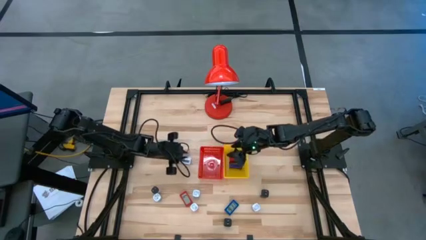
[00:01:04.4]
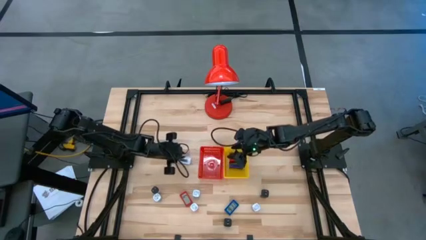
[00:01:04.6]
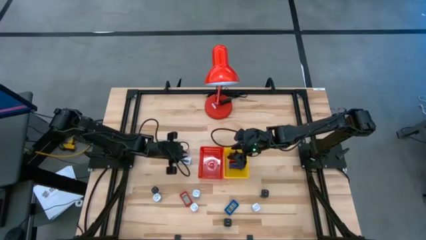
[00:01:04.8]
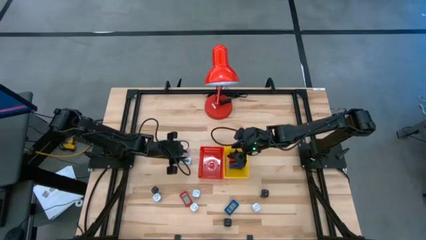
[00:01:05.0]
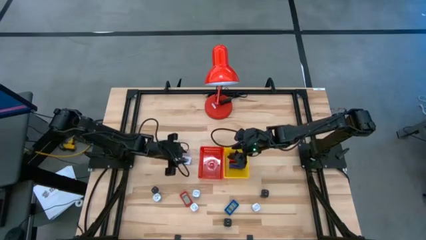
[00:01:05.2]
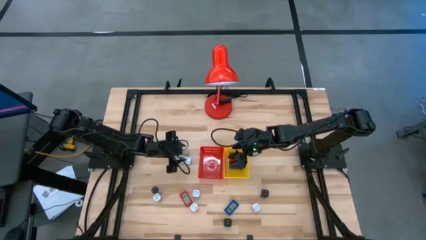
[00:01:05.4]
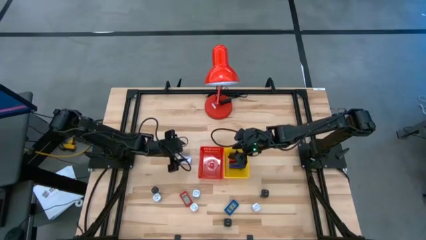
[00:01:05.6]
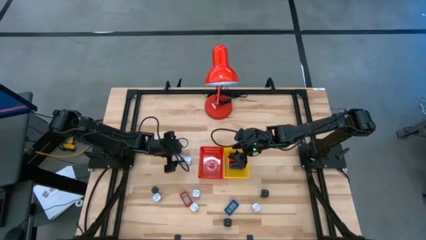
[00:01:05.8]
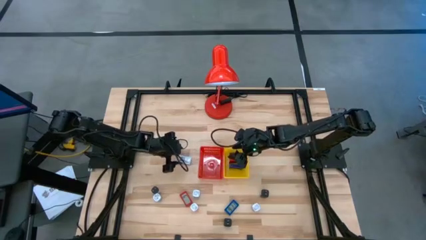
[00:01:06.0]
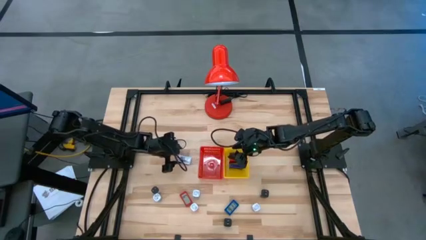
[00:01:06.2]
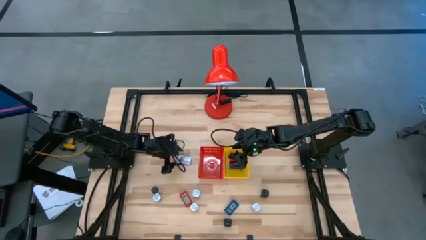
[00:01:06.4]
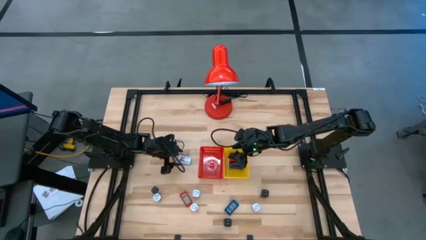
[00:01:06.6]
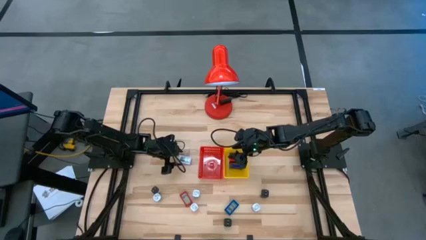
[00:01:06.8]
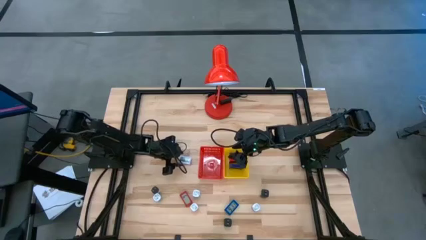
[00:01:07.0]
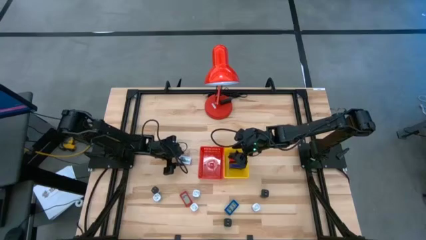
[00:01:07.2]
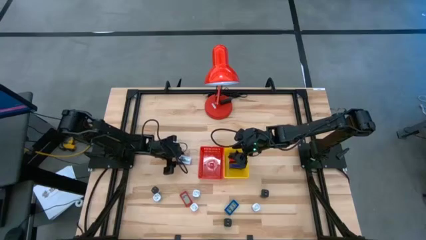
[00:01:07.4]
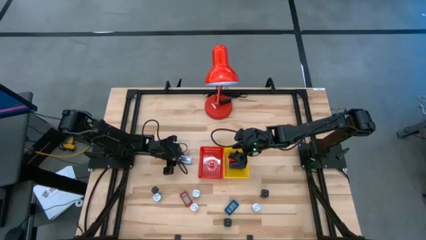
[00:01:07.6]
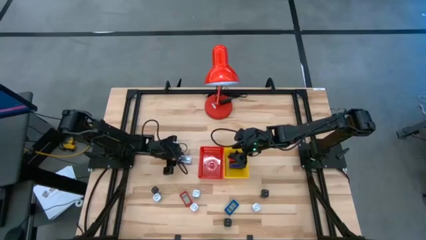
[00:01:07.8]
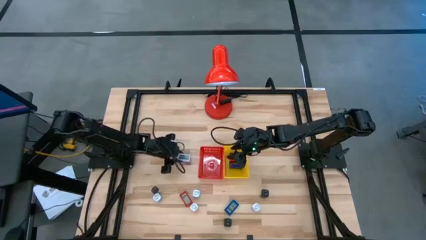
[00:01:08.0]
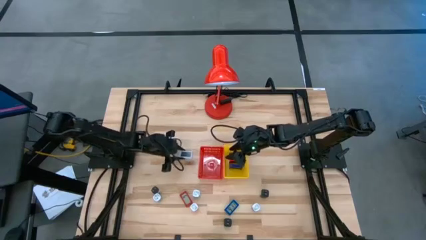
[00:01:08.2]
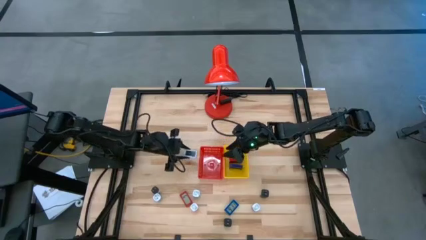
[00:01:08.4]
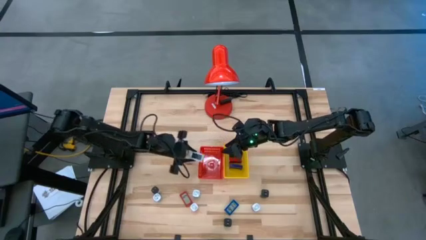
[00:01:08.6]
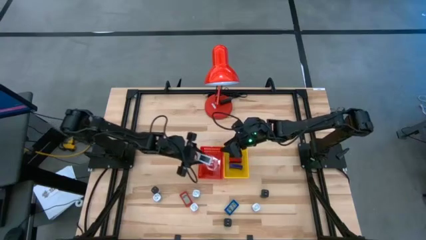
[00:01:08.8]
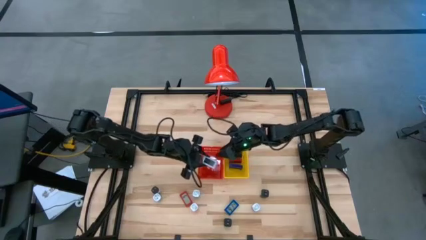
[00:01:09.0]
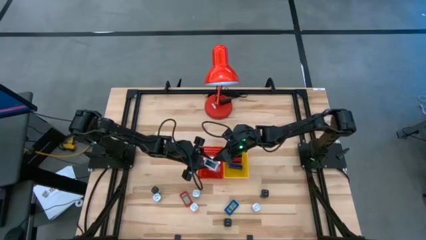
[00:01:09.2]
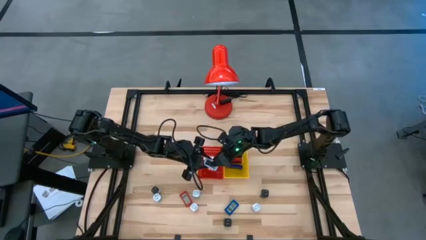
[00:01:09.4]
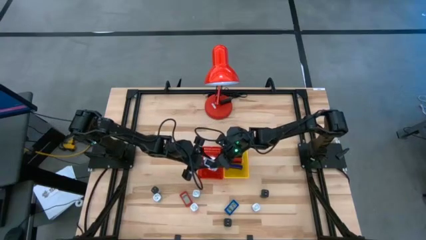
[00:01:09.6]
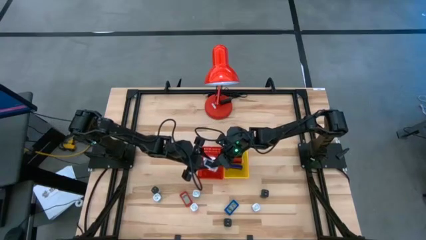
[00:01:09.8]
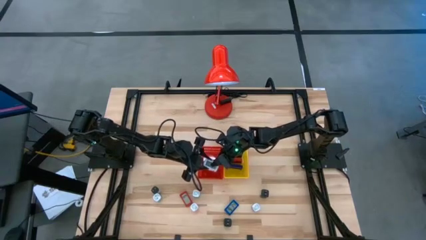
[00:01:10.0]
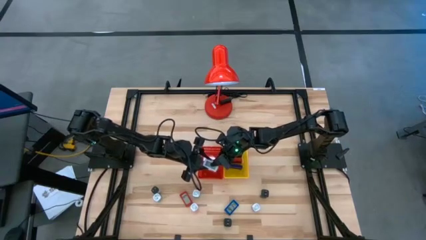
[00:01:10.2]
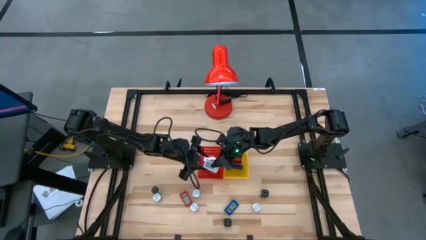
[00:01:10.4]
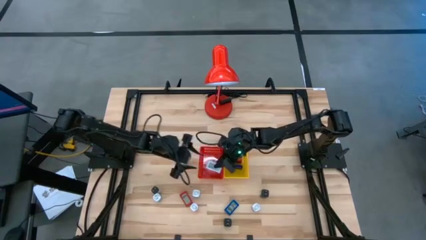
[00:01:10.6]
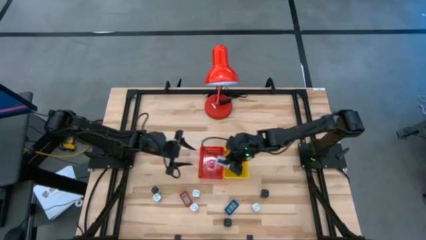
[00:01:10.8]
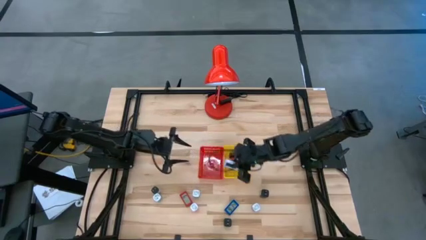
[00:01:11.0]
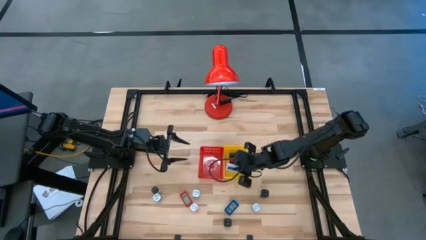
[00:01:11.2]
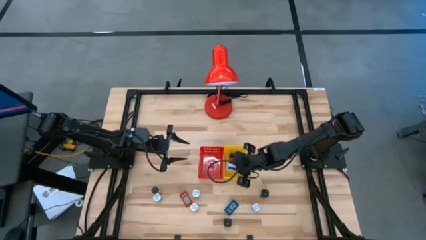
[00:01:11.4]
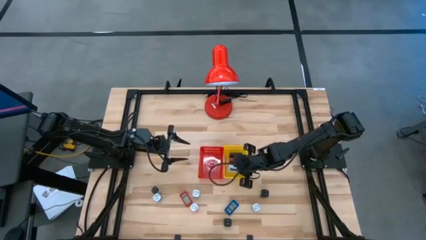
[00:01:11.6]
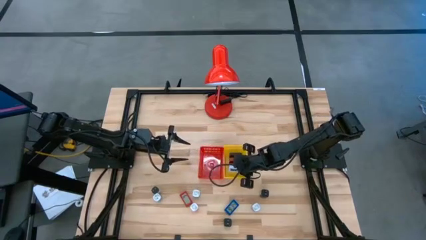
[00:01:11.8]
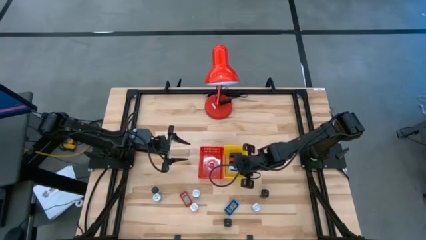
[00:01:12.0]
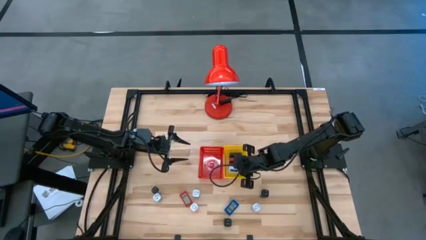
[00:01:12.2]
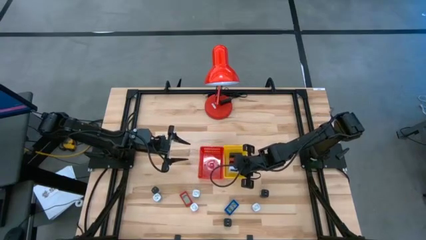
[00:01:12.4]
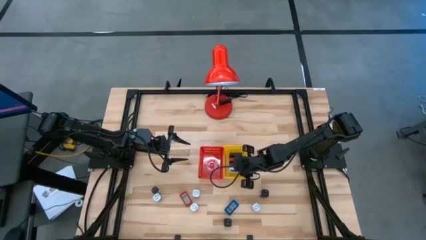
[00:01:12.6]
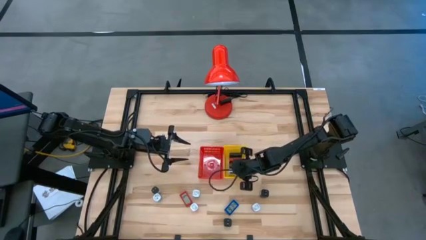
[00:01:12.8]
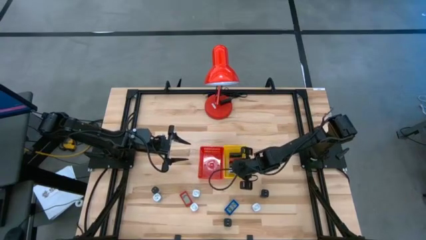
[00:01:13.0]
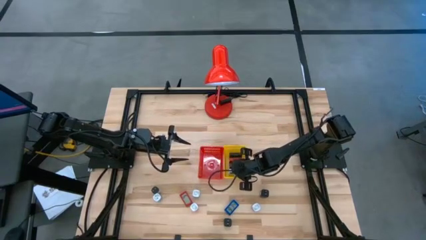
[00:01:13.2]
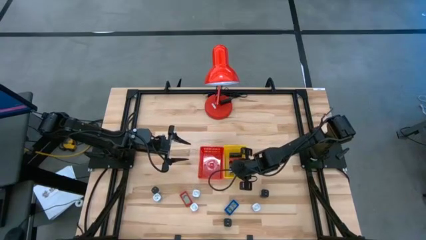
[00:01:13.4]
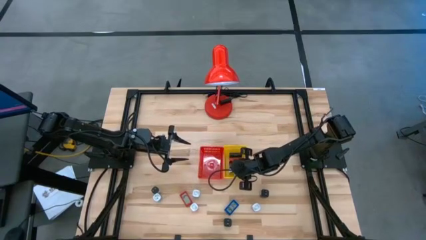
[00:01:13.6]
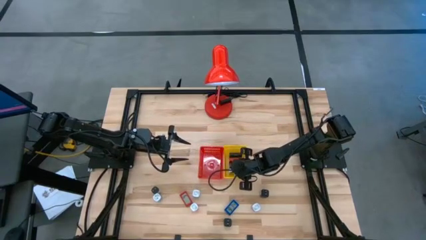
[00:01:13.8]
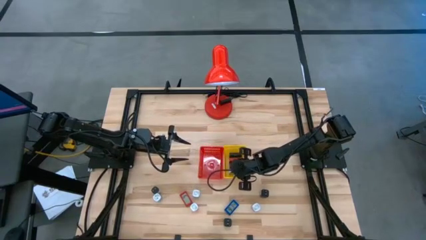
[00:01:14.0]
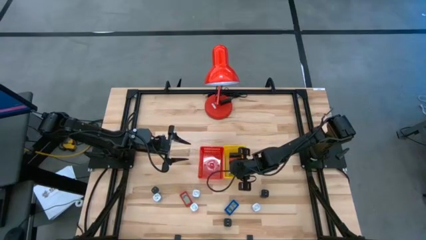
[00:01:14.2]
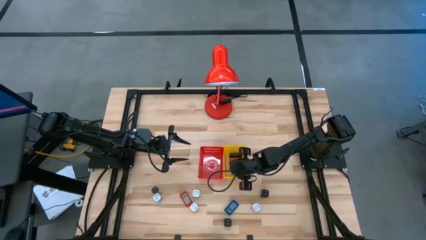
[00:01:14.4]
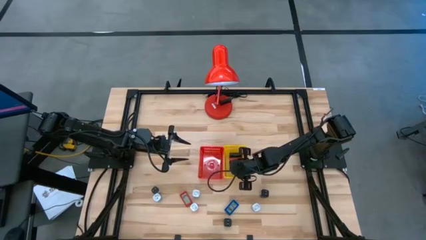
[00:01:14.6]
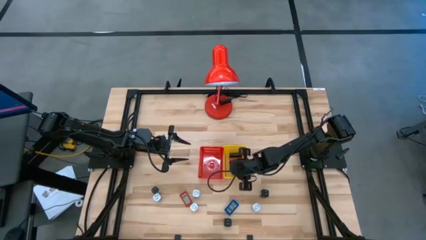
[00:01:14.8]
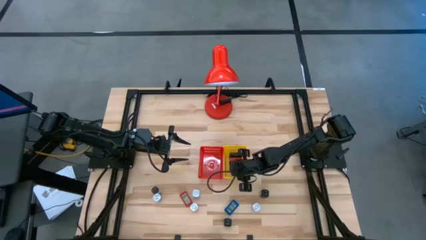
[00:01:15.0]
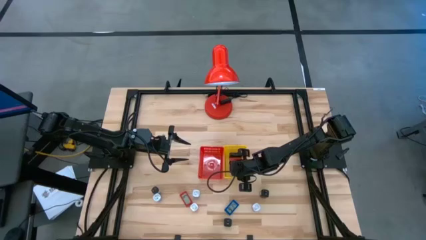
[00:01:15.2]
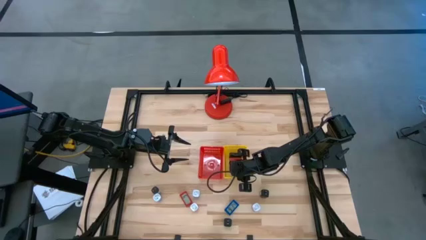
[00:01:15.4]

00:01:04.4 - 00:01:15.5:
Task: Pick & Place Office items
Put the white digital timer into the yellow bin

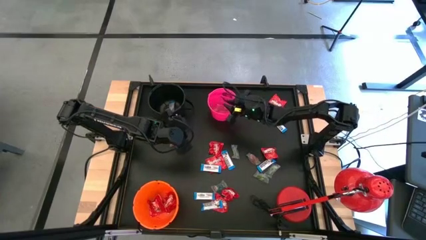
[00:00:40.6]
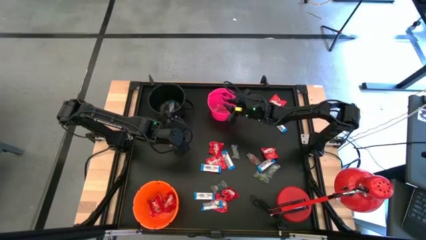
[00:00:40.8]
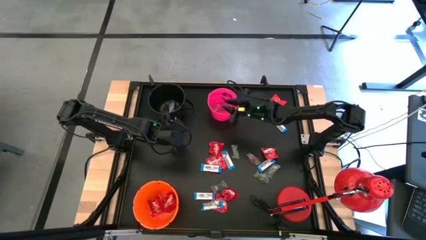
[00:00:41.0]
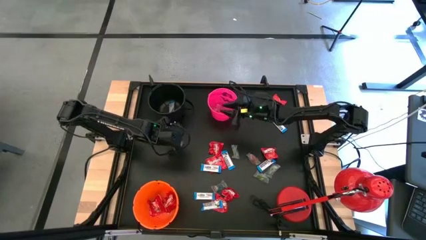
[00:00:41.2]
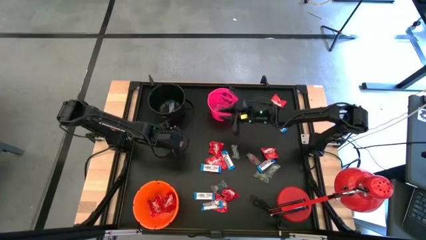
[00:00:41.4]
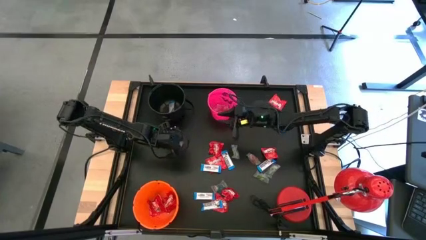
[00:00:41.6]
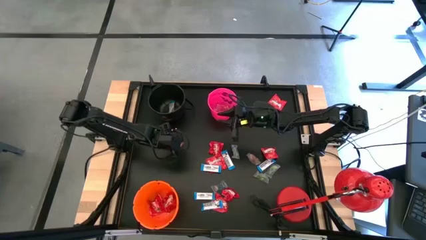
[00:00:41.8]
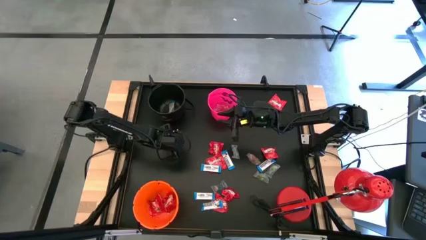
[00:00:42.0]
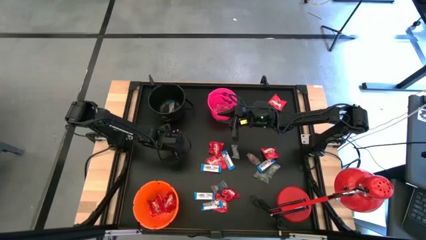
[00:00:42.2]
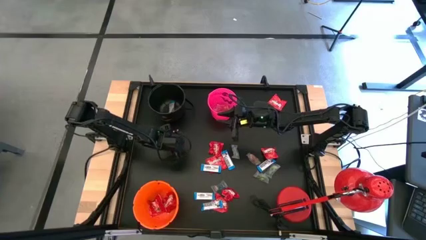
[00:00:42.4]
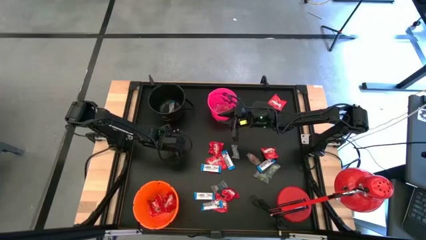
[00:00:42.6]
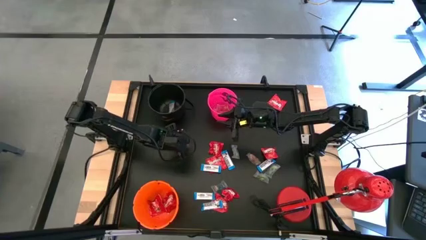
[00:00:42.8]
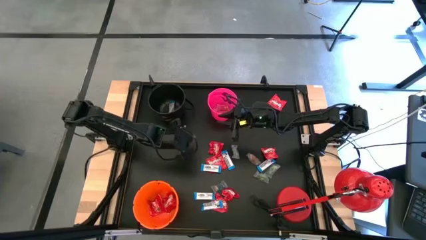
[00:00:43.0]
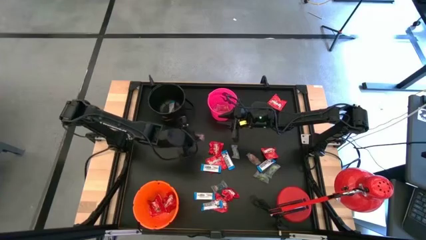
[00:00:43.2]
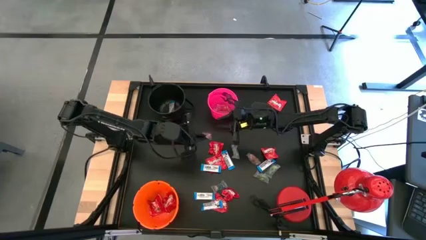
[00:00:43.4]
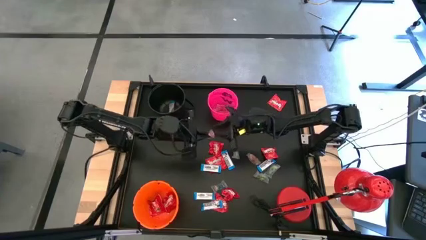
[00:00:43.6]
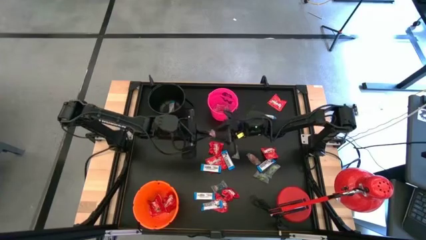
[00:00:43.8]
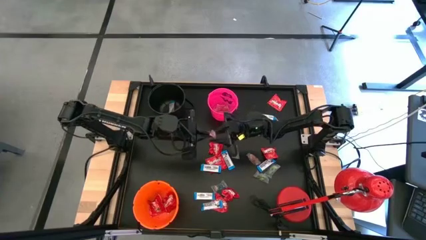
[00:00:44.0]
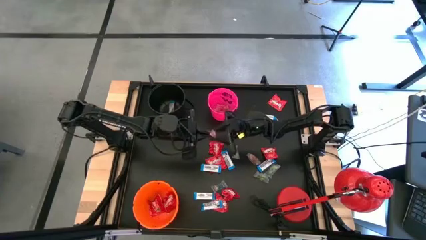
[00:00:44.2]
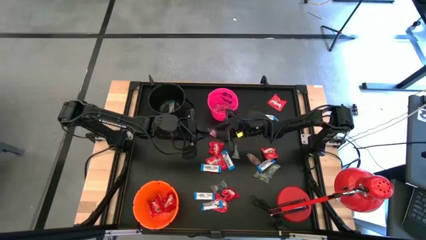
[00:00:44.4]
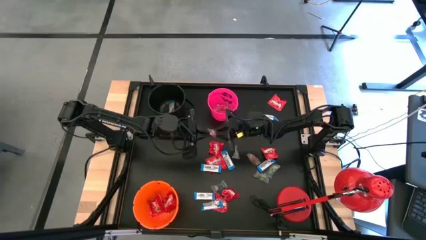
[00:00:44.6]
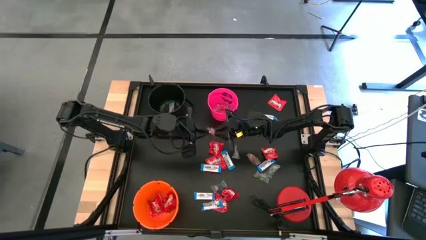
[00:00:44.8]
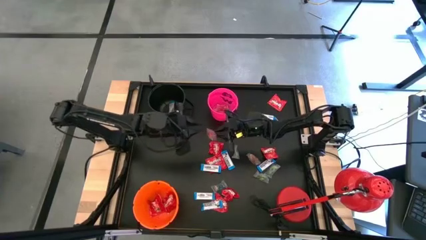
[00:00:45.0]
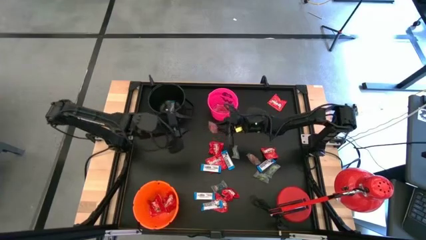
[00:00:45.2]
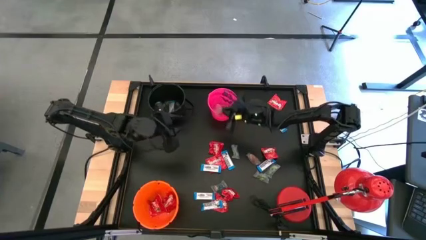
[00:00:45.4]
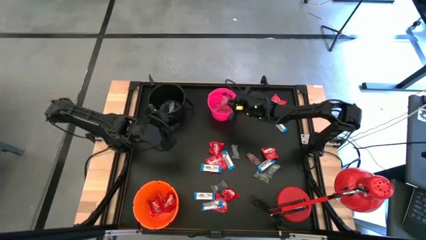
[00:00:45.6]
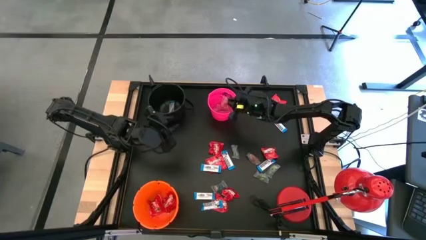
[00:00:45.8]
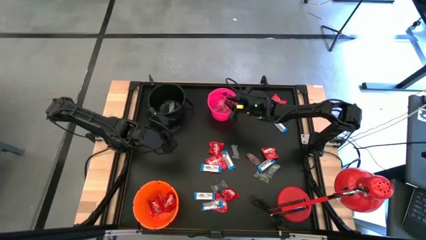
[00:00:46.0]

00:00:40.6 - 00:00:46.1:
Task: Organize candy in baskets
Put the red gummy into the pink bucket
